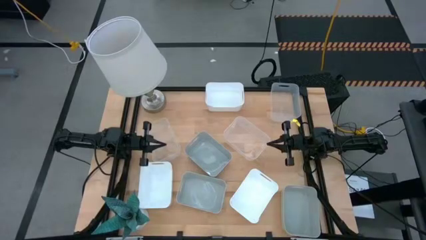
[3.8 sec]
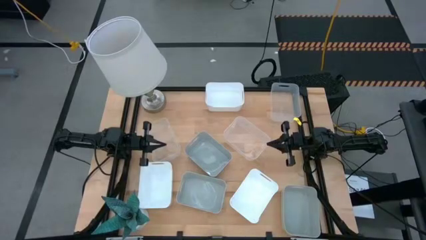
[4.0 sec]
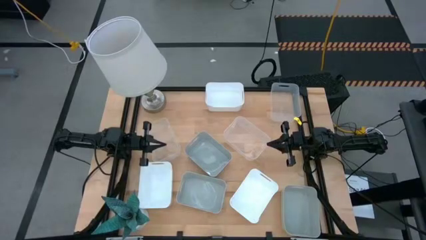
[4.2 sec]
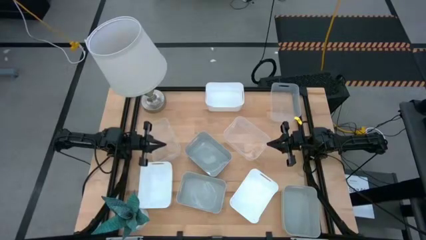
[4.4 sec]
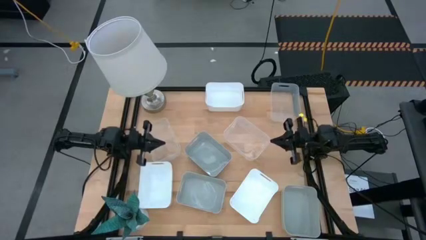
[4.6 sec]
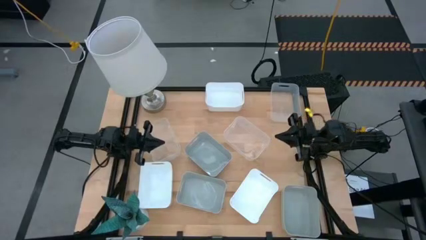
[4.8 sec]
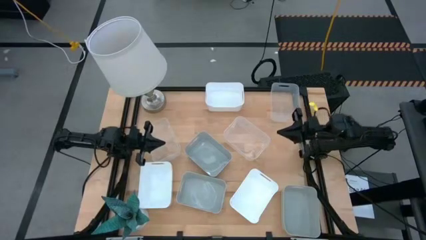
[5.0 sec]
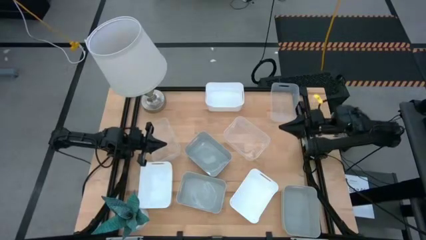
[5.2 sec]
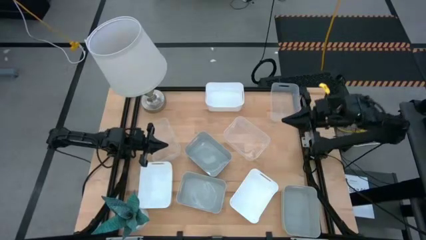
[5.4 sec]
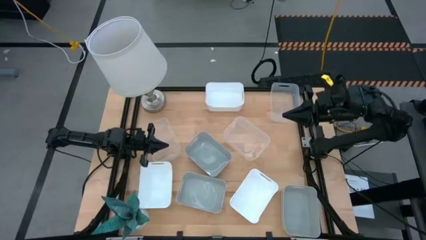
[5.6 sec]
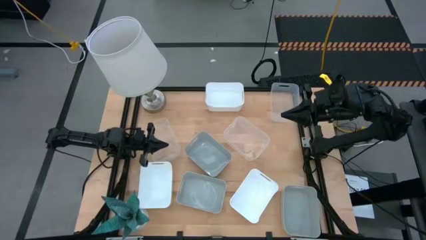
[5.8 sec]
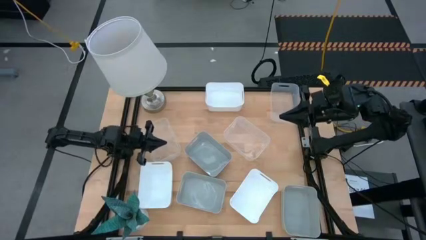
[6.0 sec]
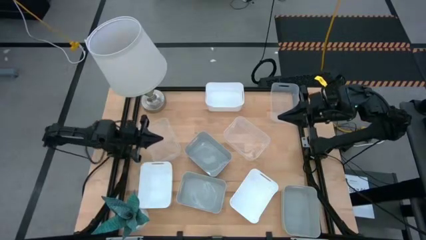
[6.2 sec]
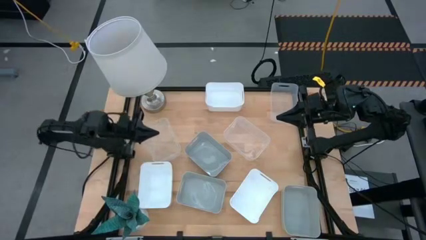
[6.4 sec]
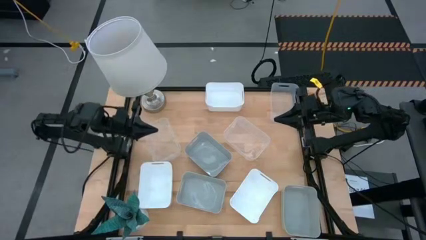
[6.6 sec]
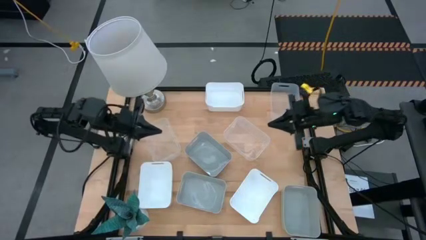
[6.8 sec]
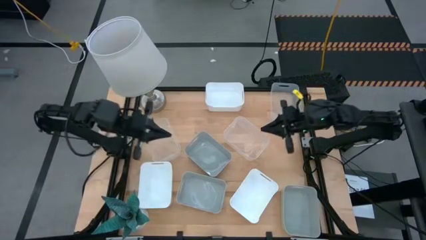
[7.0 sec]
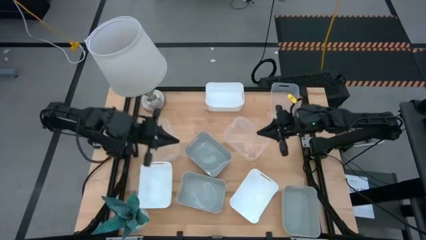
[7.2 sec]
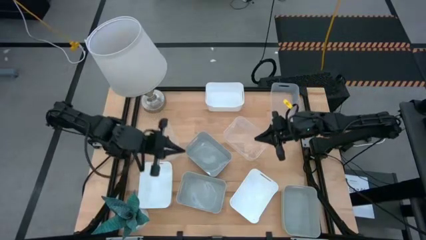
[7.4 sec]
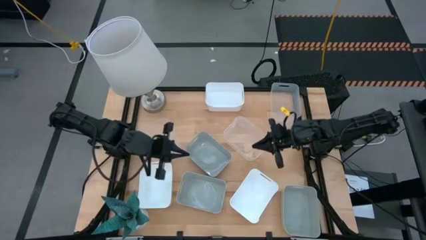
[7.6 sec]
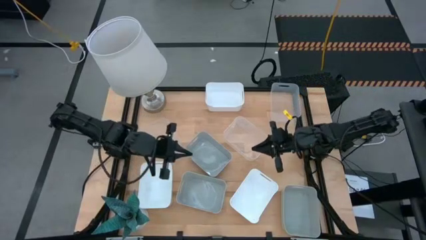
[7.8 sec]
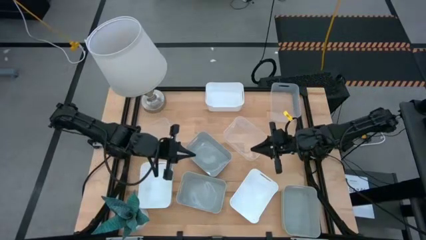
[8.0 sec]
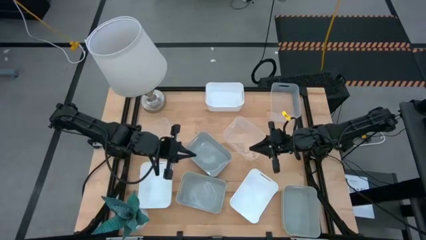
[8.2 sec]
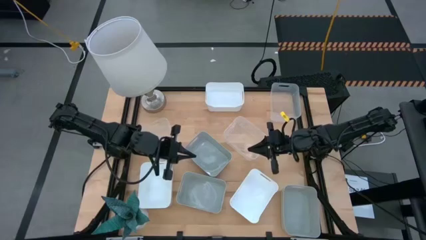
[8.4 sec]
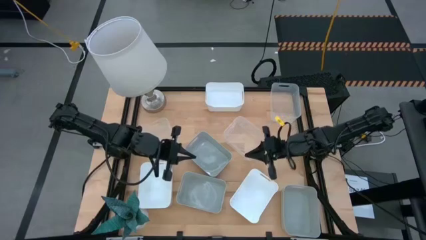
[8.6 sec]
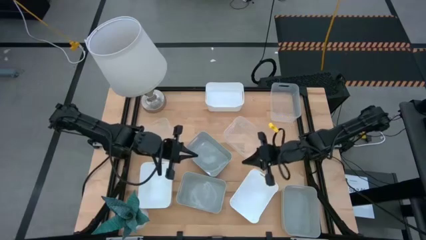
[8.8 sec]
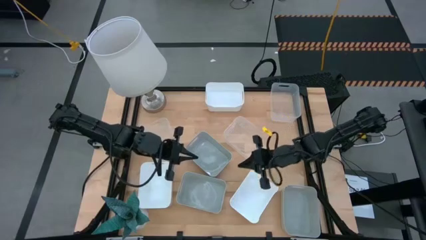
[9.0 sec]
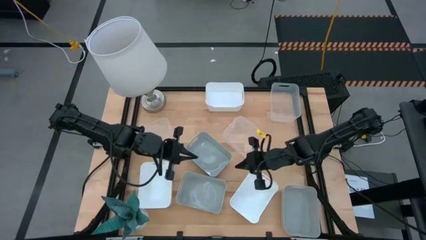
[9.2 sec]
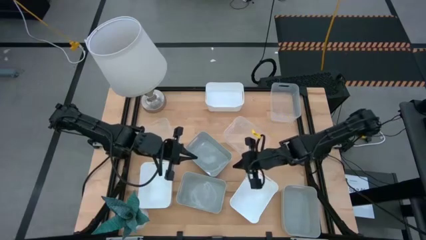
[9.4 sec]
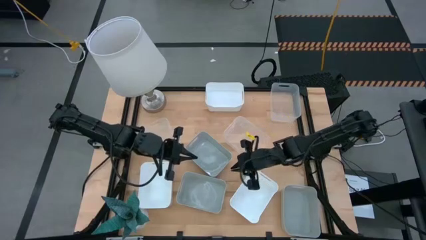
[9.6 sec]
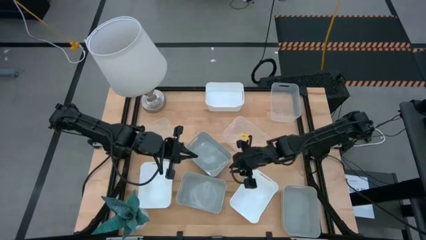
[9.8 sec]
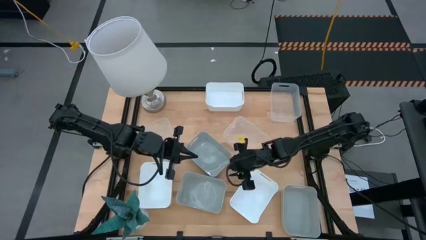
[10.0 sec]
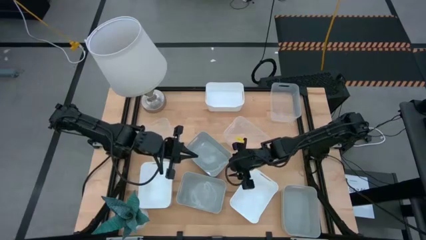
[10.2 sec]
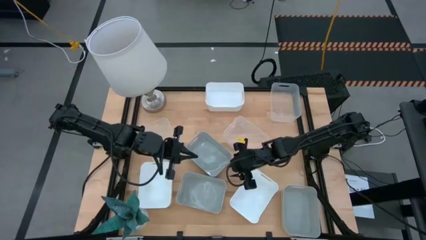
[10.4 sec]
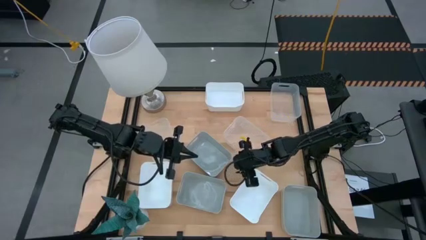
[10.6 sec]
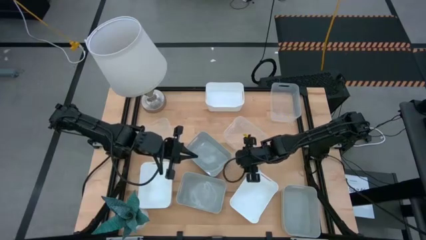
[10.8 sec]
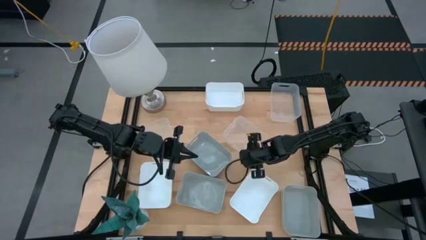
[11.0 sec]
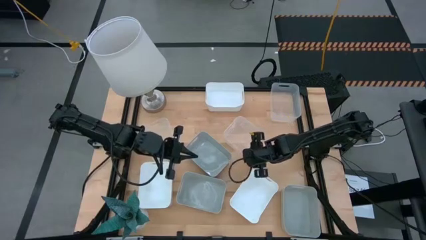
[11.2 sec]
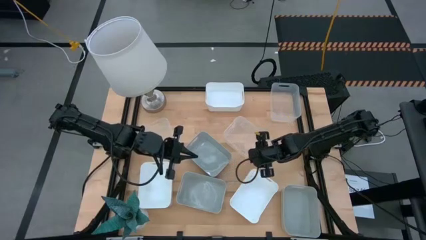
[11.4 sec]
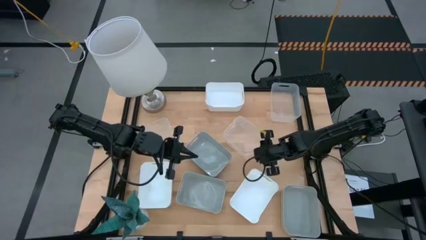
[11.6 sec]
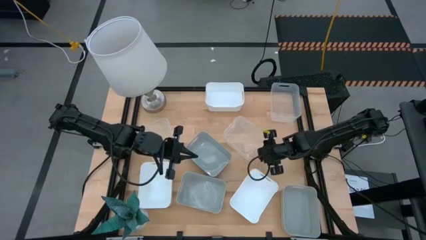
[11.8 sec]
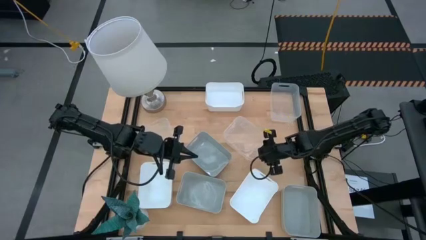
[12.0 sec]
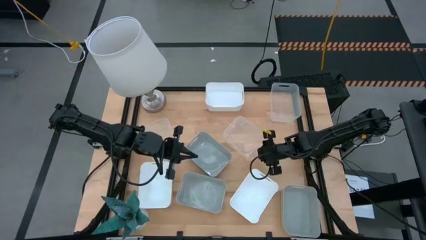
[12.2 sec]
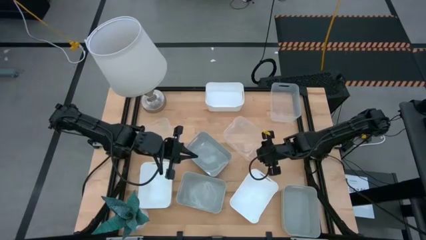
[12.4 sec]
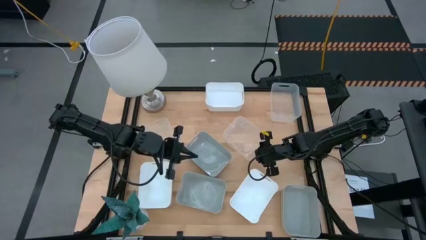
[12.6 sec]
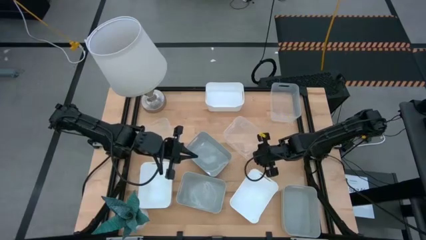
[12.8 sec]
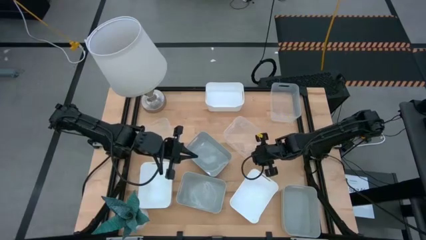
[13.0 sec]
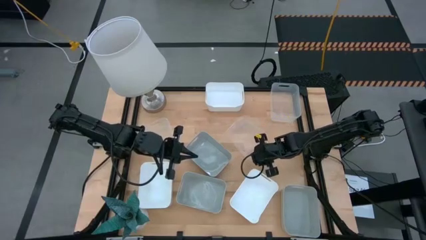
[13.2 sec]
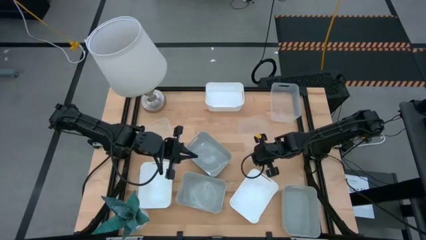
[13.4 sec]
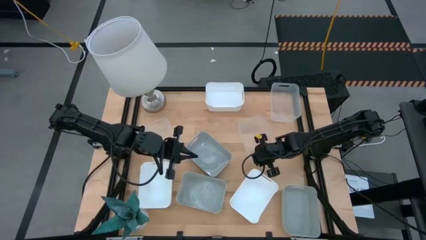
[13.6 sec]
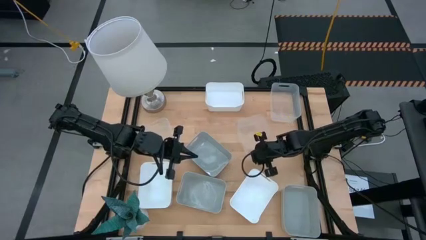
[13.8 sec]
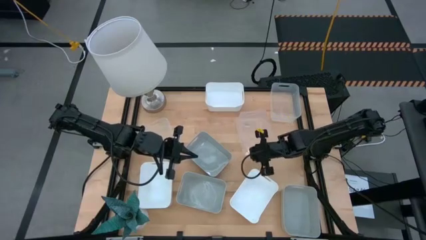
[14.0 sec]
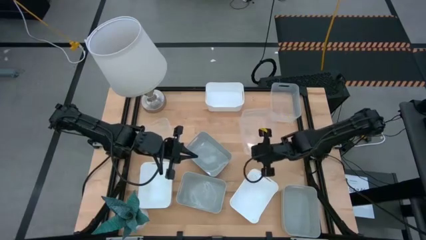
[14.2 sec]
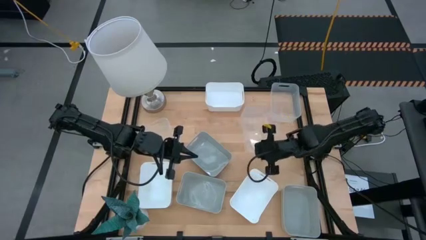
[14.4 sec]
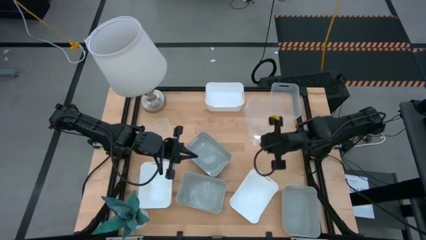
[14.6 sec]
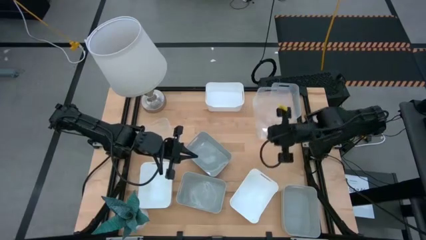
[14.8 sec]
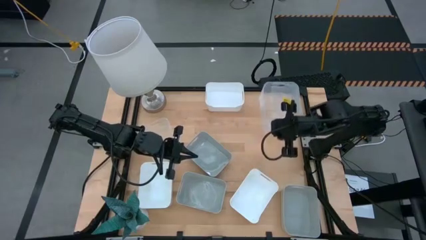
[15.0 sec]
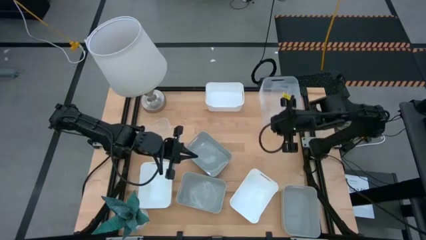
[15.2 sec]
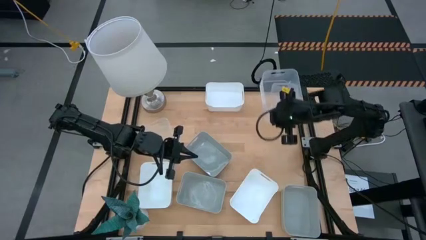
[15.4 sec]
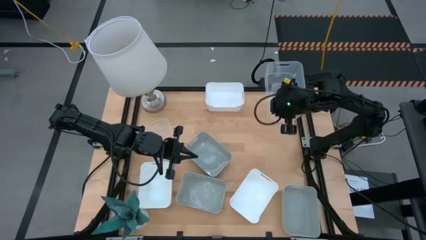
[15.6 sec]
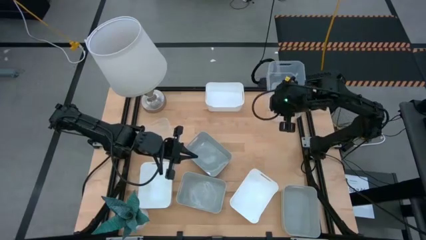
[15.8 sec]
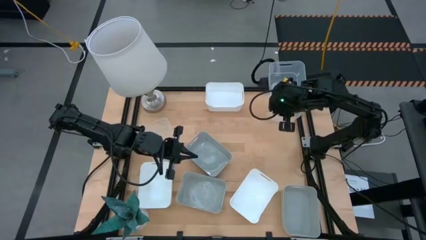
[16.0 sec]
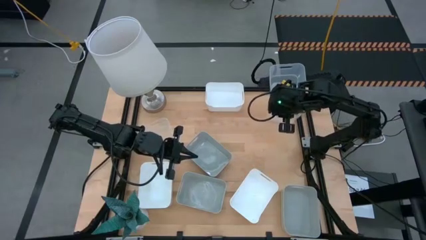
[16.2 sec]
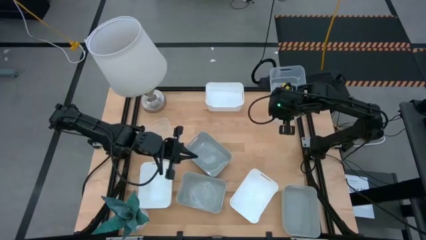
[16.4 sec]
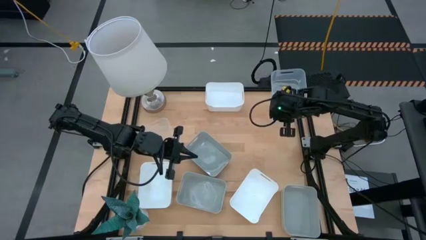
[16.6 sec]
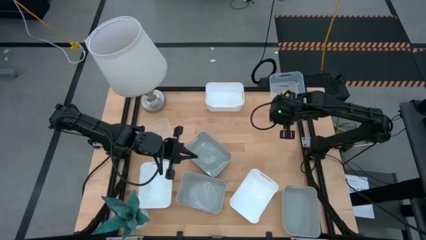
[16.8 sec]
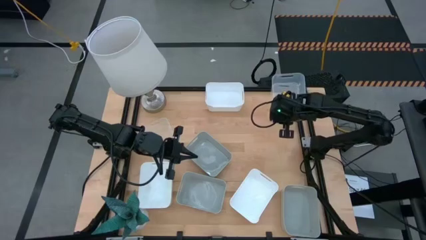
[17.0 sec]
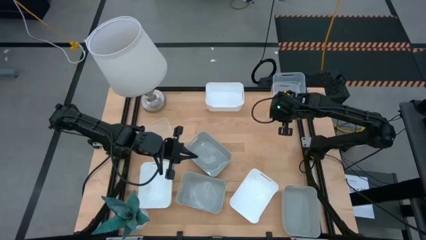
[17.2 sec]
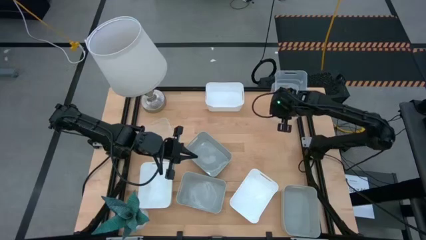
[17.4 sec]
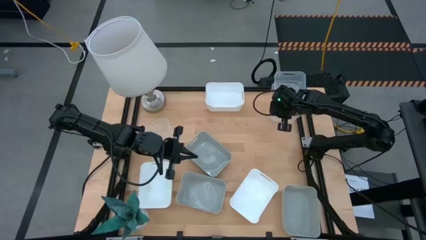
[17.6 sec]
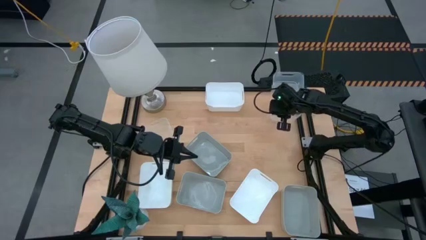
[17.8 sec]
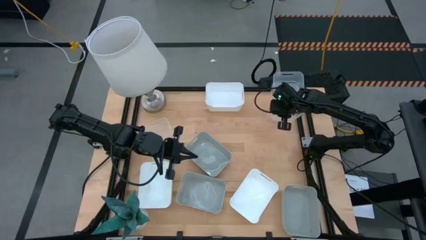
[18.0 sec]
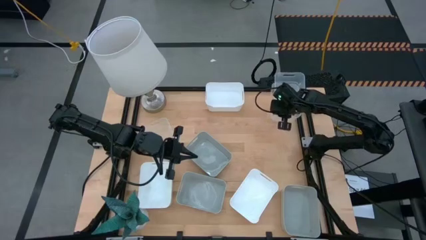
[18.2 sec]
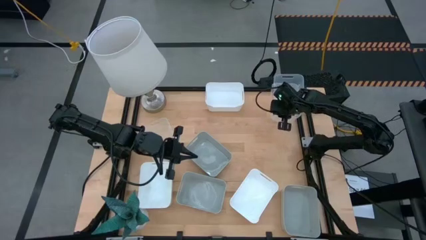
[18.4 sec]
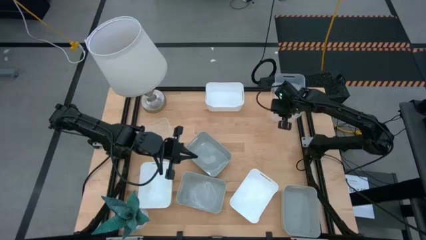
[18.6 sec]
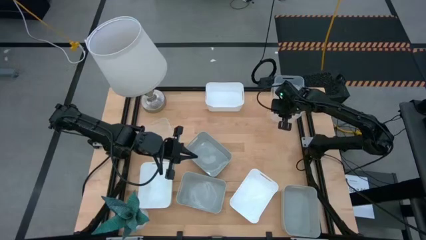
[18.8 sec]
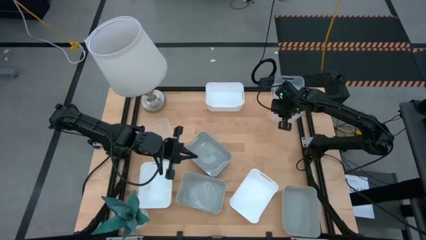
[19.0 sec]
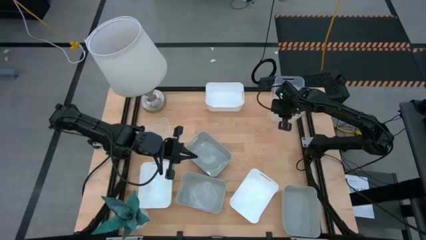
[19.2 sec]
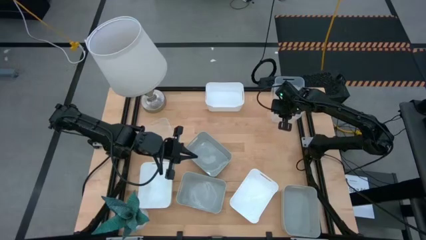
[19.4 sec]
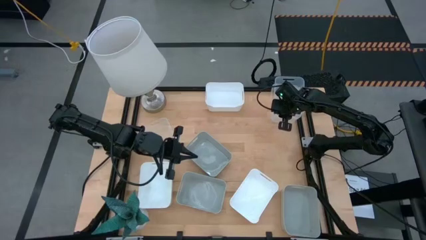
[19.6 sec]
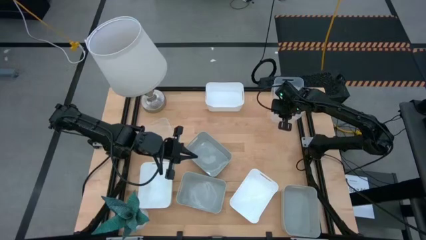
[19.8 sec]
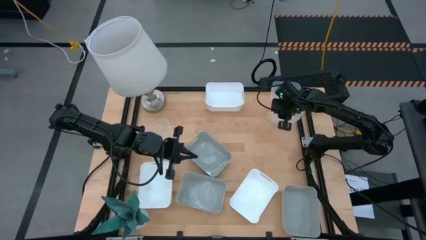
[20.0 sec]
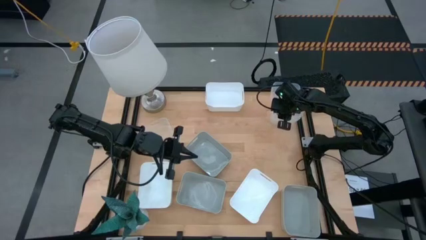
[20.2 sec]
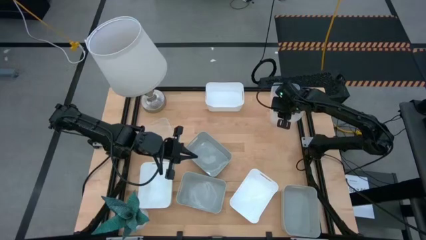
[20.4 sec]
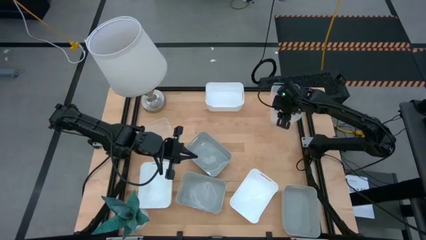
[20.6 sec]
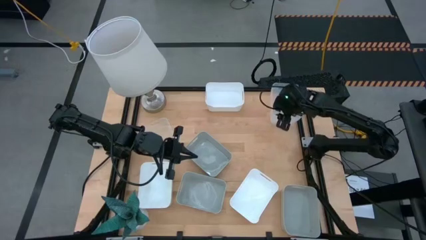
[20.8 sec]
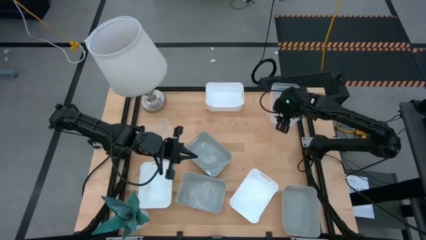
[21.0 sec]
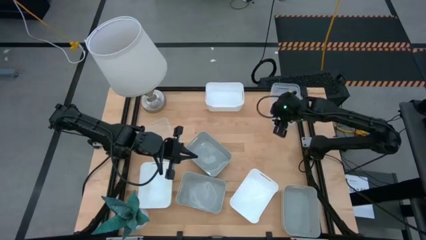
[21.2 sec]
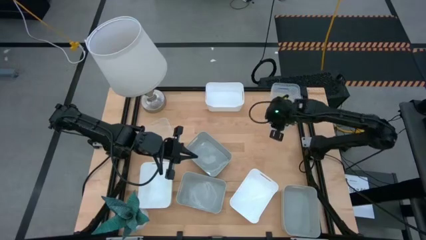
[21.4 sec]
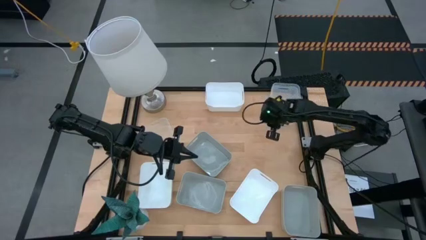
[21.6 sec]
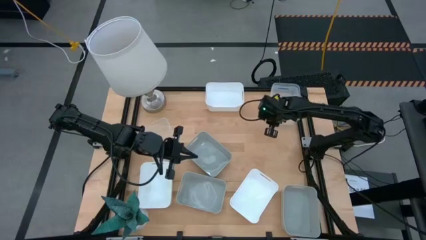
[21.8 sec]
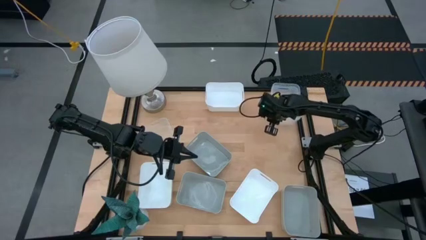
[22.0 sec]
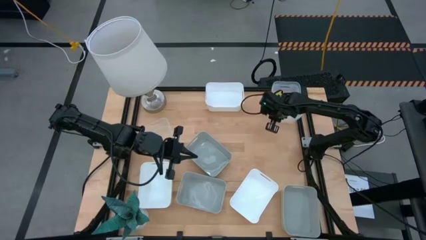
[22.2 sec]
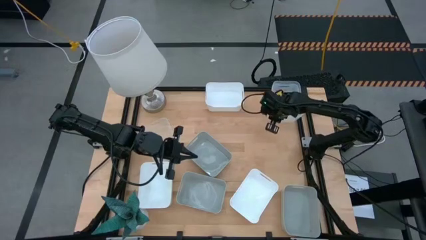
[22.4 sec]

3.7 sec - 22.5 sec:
Stack the bottom left transparent bin on the top transparent bin
